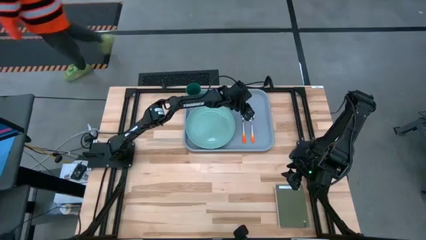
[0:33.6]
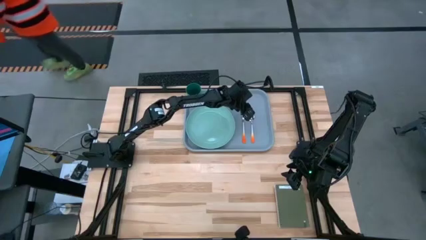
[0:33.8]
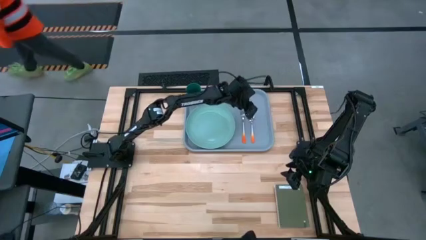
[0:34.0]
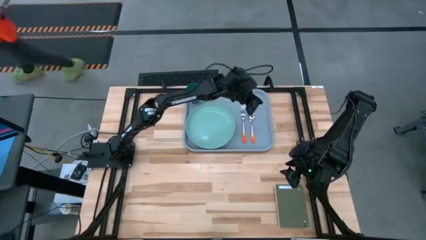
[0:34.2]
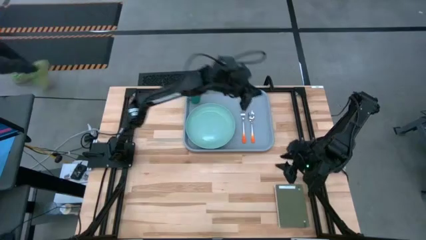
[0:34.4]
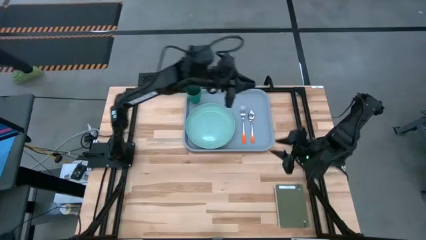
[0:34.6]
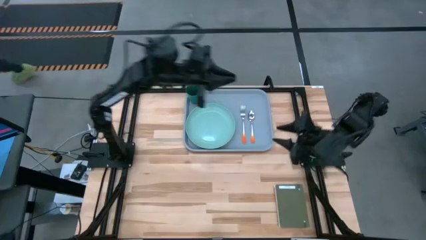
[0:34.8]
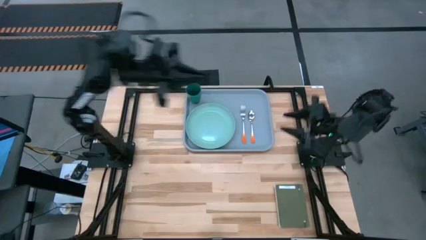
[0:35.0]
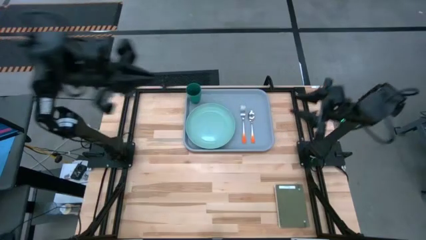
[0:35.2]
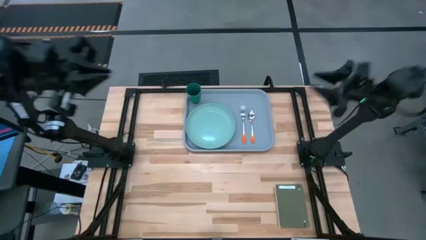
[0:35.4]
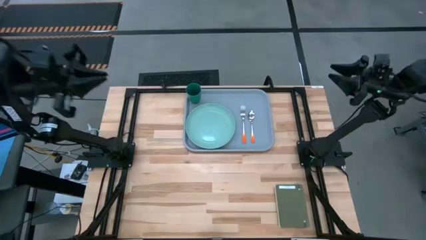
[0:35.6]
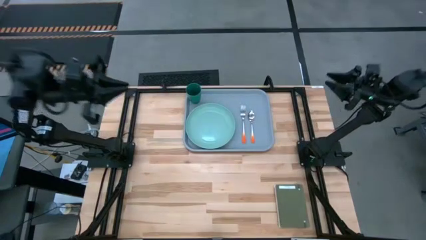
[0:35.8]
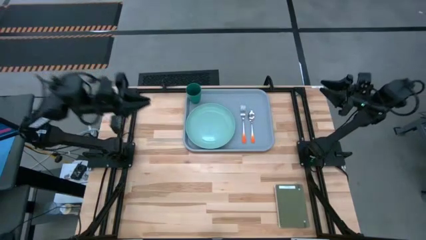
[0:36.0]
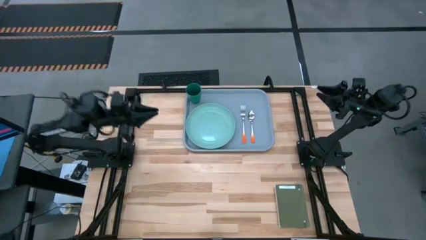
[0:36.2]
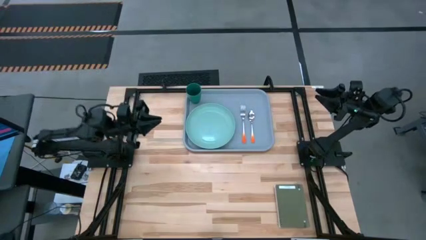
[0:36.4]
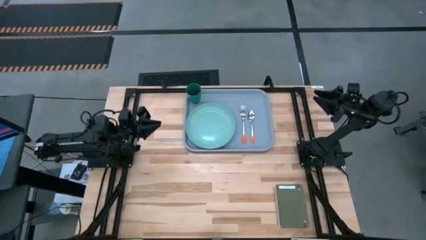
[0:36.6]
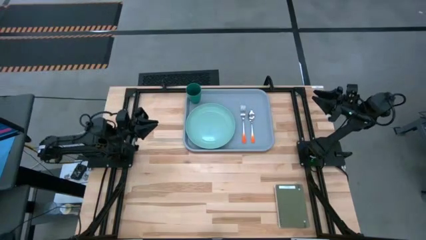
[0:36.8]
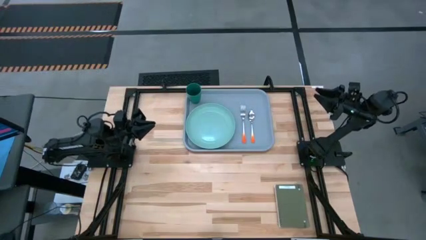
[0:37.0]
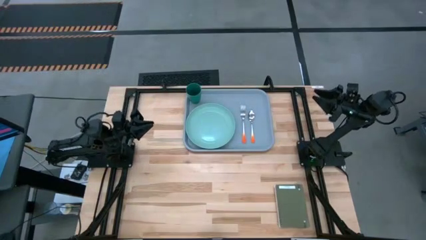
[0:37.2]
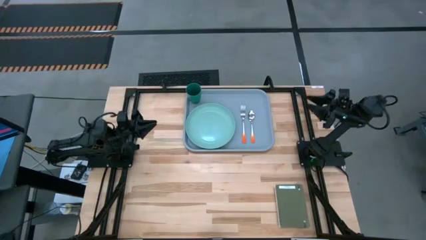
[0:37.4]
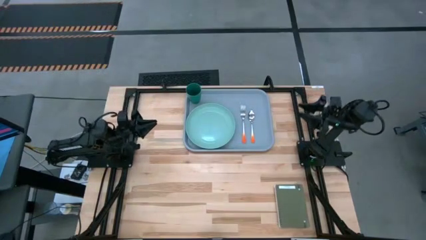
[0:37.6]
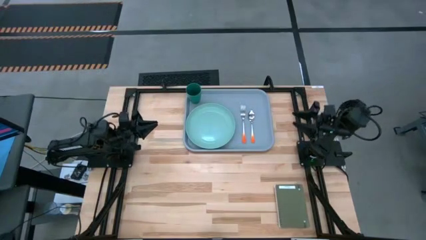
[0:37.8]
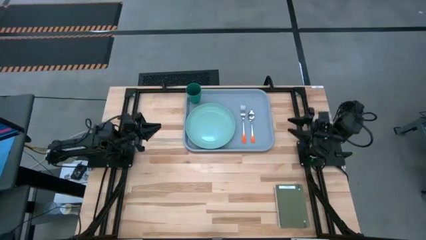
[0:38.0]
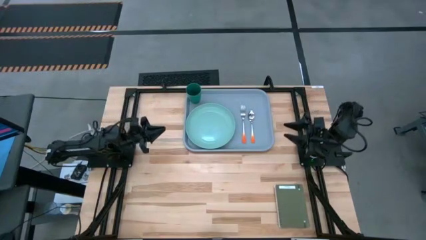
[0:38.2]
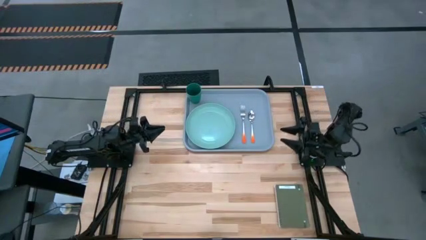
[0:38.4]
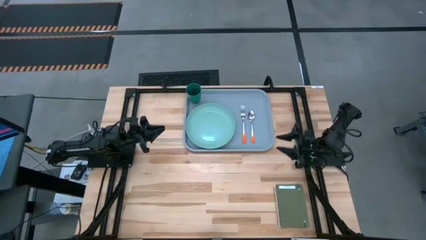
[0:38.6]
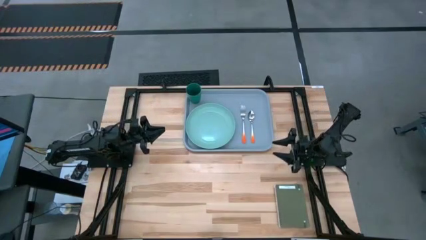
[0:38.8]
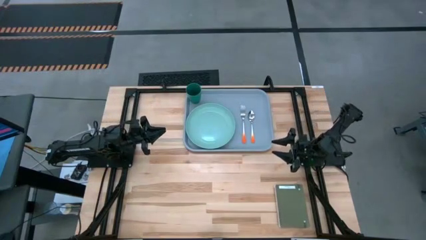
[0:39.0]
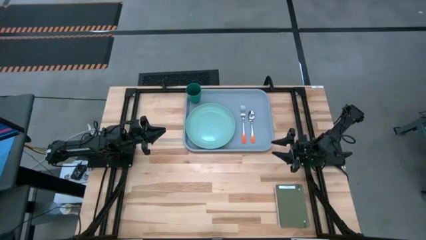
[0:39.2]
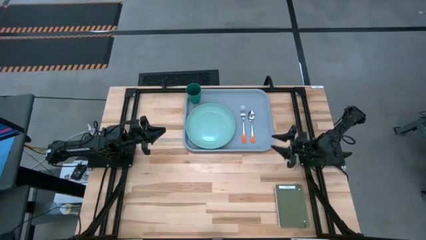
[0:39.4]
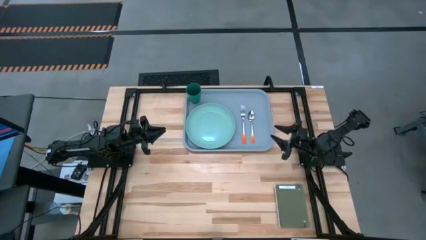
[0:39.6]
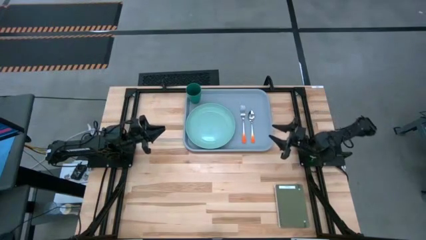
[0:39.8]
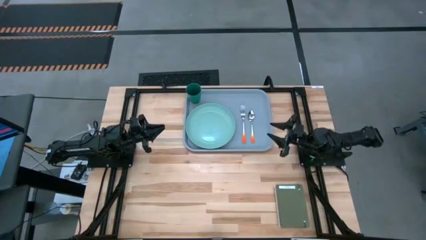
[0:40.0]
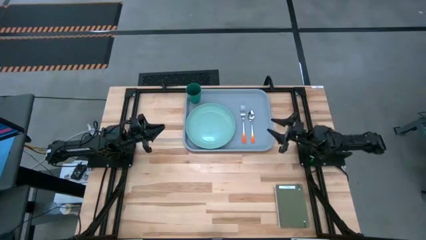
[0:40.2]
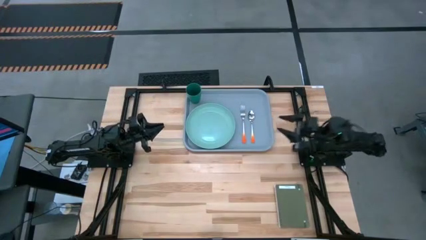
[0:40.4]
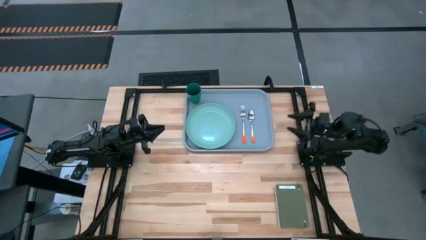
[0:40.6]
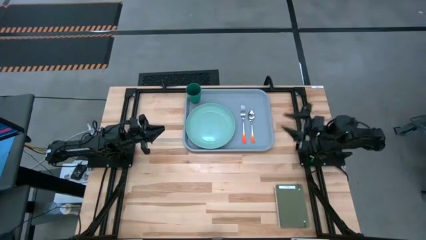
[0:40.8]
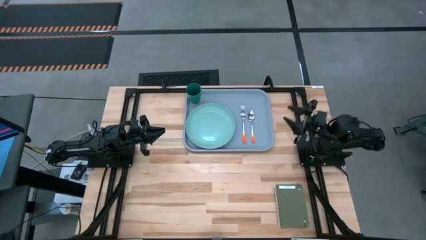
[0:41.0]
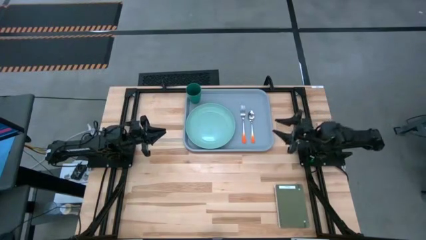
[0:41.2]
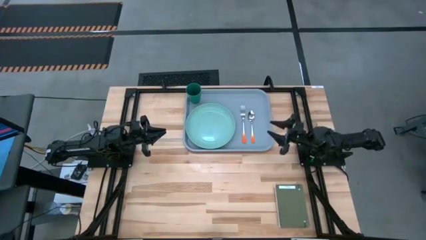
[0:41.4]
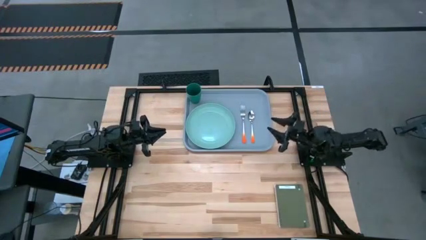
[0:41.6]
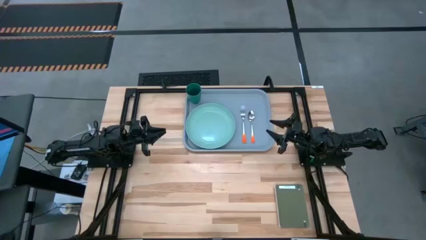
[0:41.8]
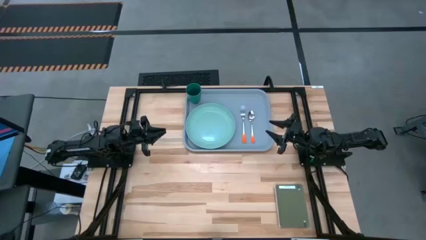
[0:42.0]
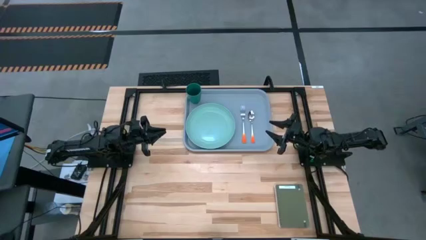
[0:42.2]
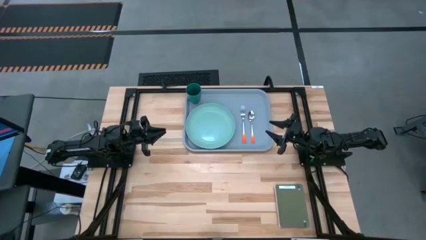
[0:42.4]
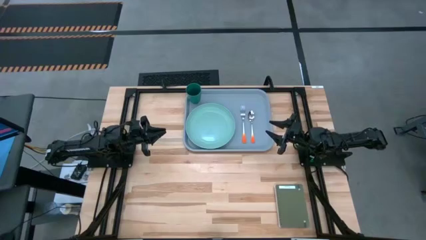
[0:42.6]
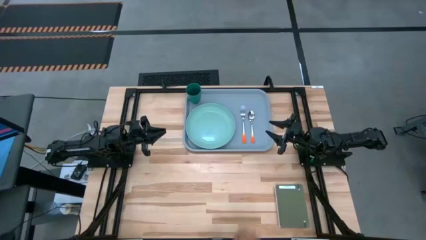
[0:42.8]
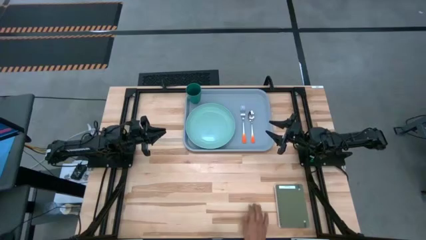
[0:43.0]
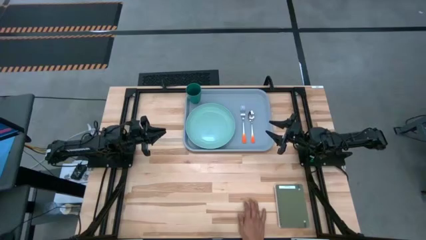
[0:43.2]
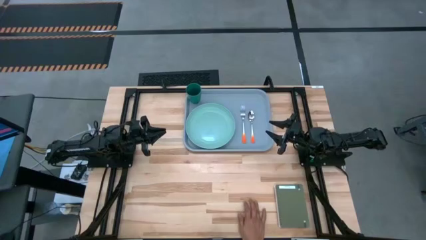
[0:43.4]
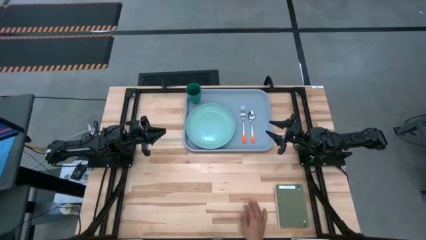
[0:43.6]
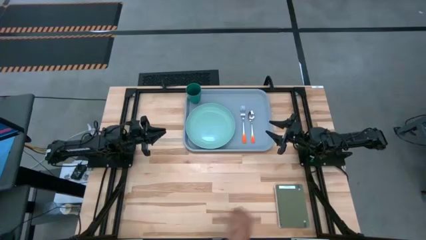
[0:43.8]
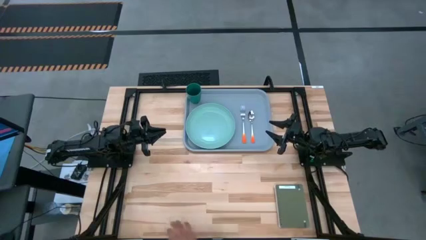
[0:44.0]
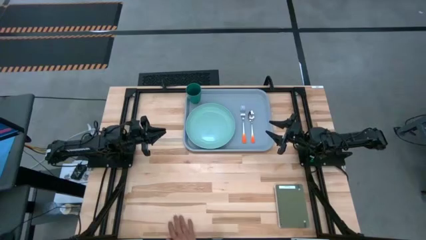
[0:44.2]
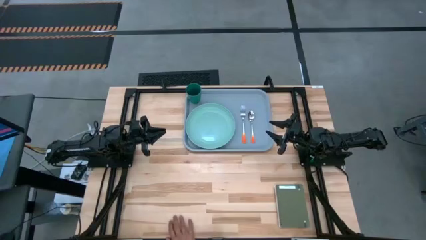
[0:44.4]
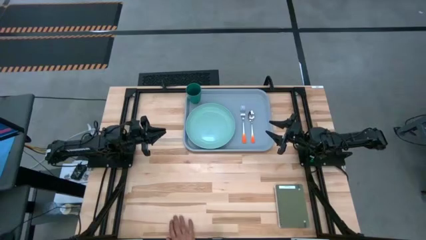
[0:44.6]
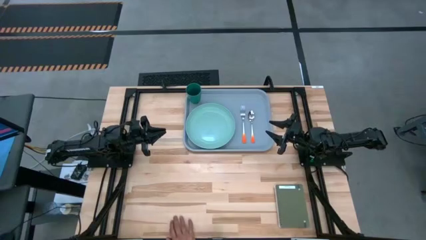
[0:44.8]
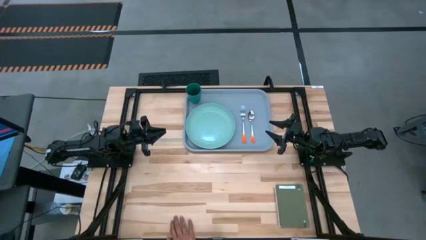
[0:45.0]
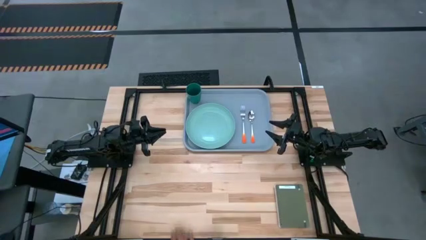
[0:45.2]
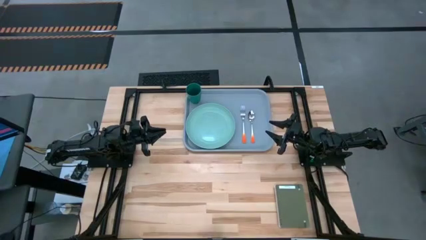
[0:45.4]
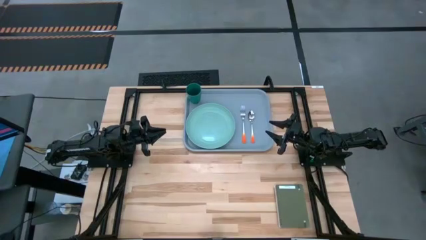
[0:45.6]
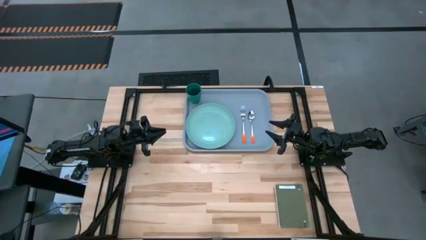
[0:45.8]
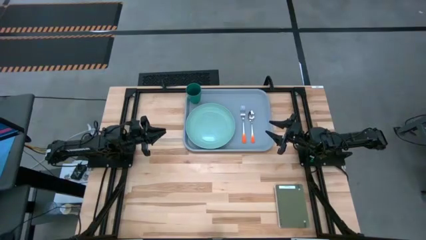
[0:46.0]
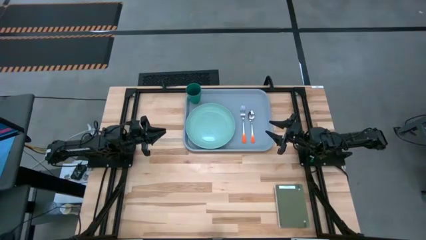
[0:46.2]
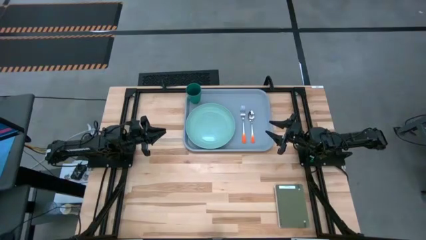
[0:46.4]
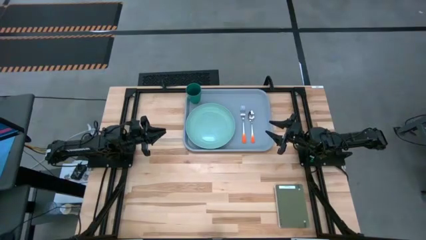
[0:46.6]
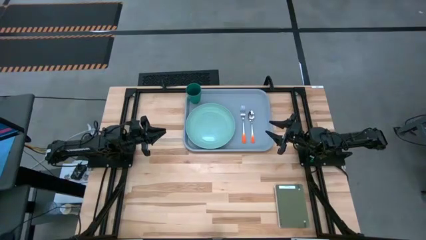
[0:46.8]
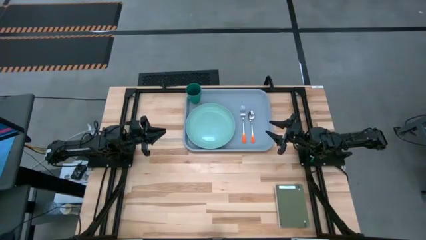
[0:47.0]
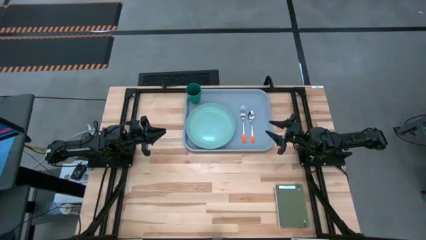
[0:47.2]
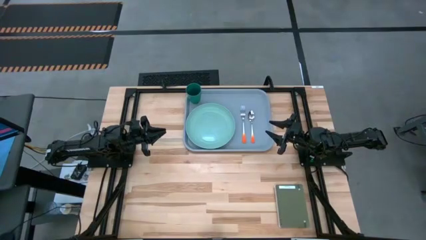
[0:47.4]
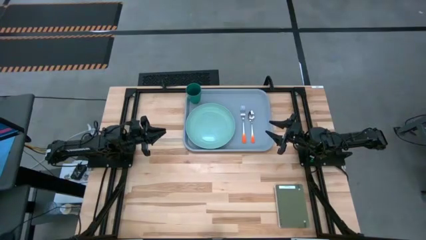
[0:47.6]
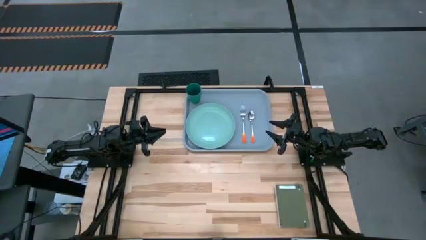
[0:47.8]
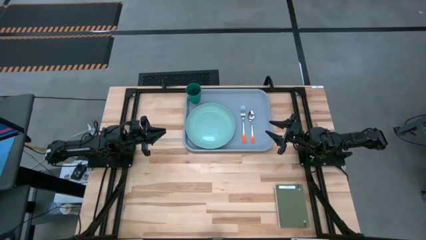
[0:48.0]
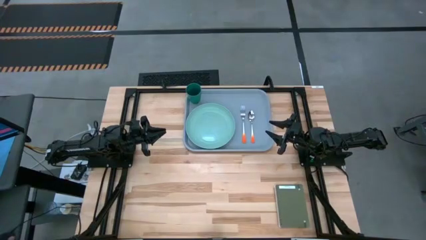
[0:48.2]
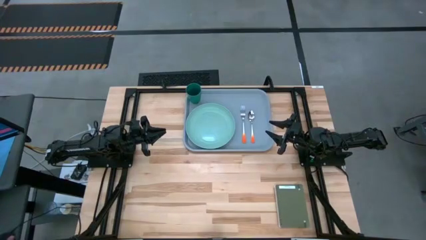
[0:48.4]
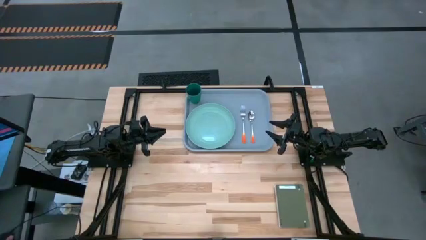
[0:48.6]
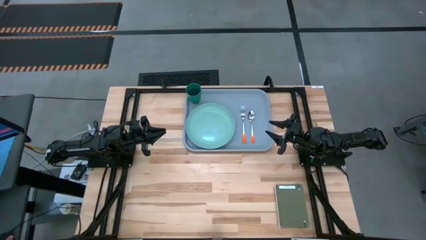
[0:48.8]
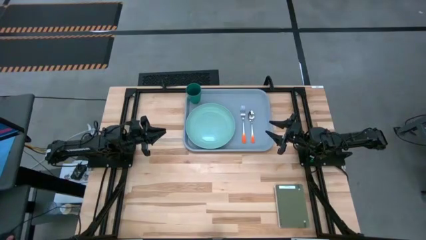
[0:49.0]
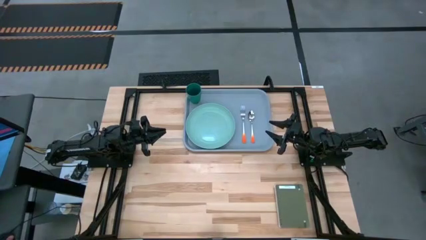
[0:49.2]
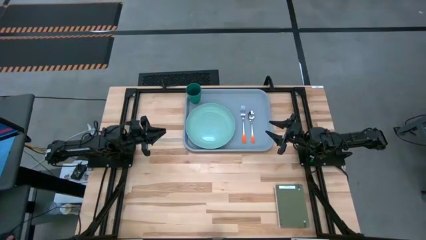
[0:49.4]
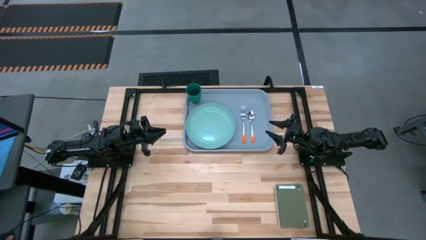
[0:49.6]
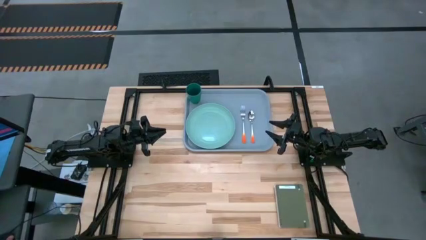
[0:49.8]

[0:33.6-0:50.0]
Task: Pick and place plate/cup/fork/spoon on tray
Return to Home Position
